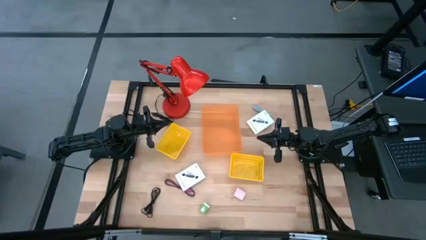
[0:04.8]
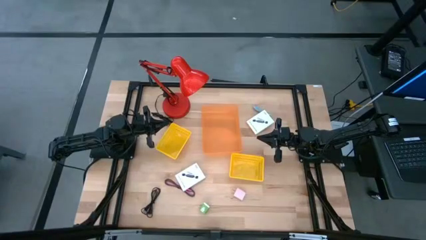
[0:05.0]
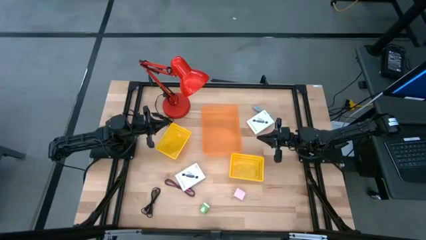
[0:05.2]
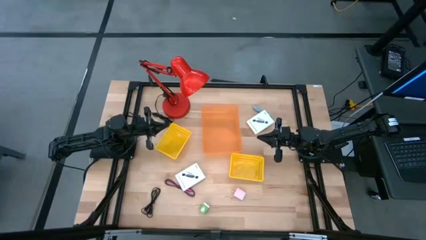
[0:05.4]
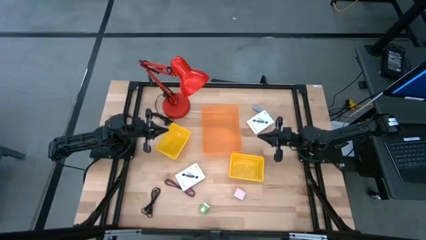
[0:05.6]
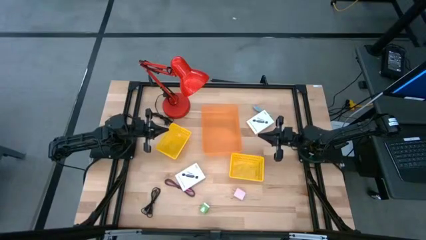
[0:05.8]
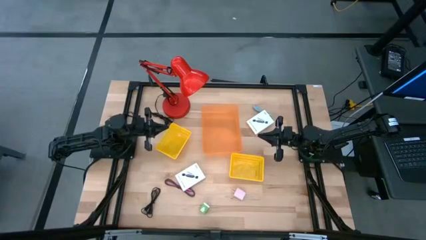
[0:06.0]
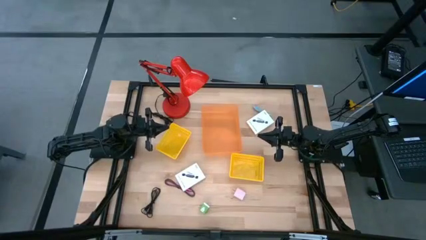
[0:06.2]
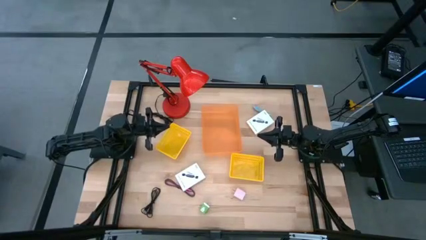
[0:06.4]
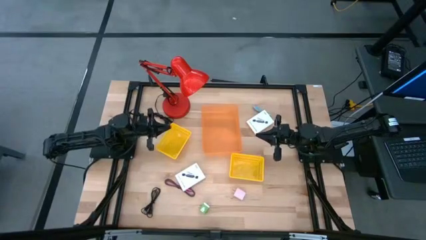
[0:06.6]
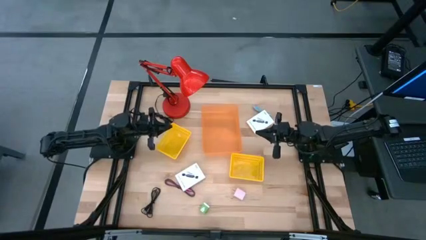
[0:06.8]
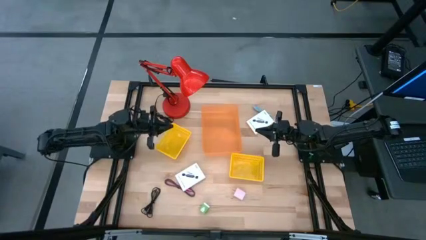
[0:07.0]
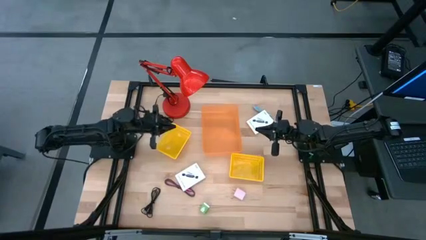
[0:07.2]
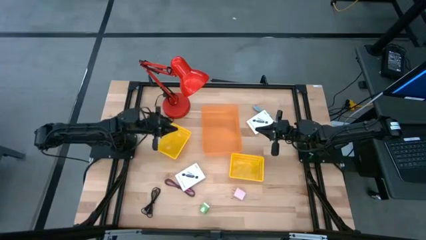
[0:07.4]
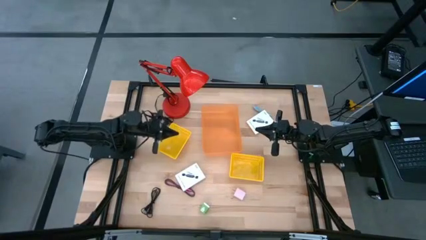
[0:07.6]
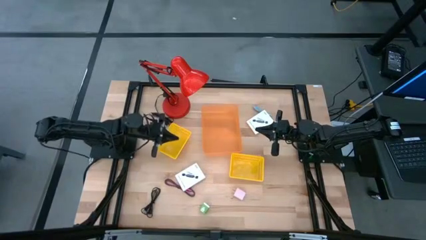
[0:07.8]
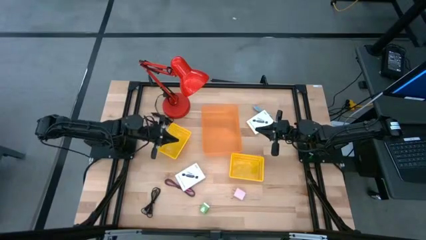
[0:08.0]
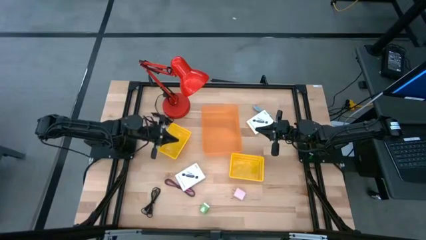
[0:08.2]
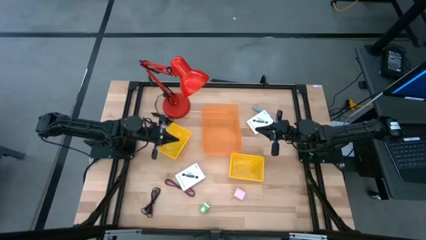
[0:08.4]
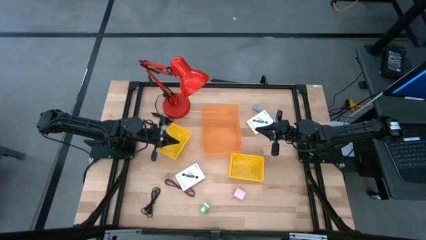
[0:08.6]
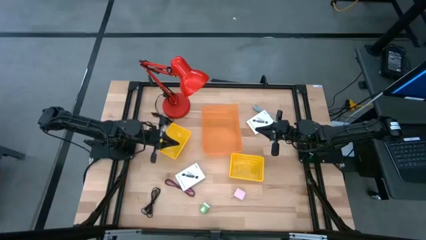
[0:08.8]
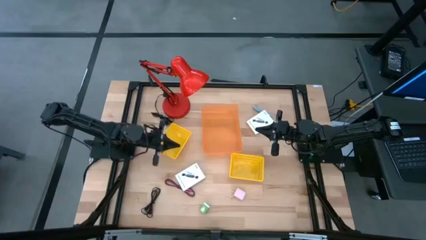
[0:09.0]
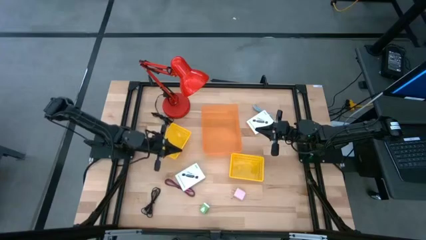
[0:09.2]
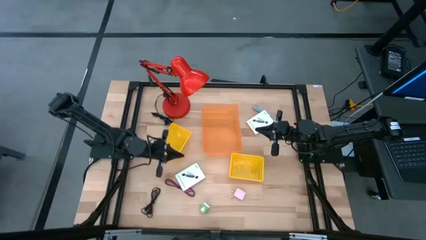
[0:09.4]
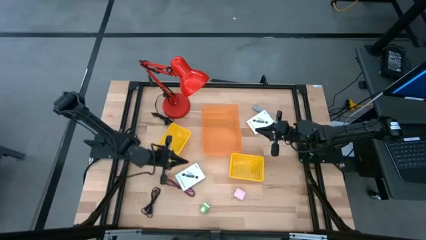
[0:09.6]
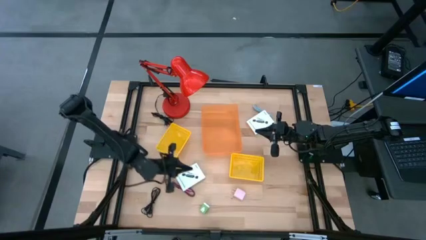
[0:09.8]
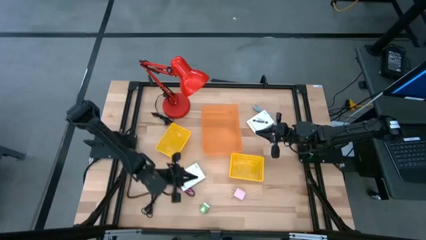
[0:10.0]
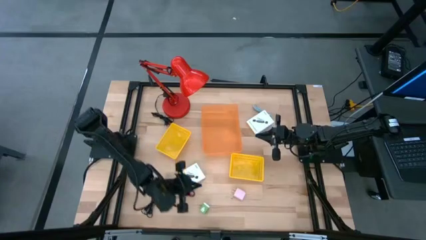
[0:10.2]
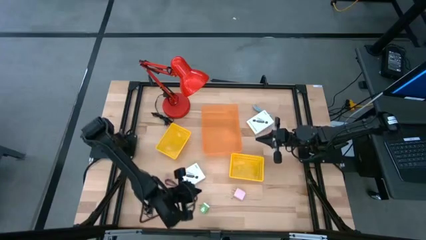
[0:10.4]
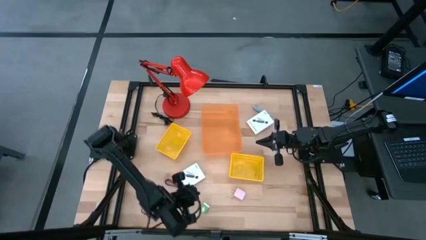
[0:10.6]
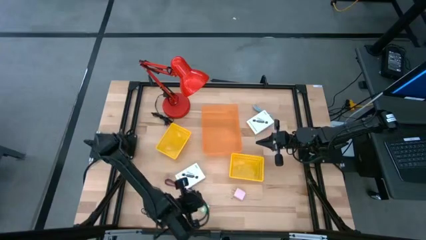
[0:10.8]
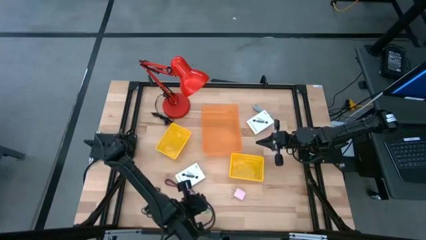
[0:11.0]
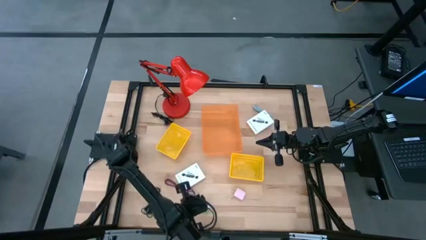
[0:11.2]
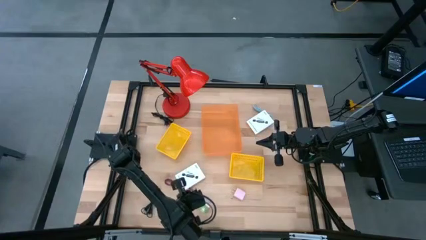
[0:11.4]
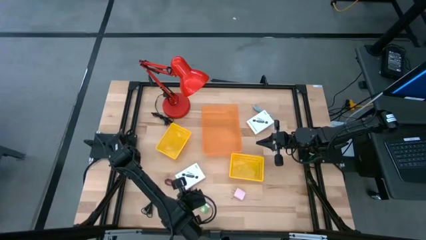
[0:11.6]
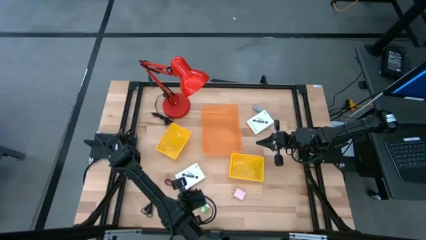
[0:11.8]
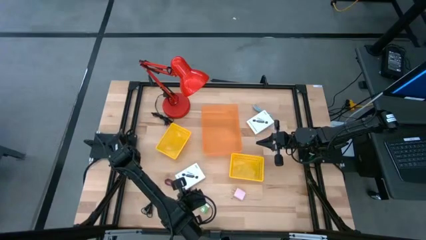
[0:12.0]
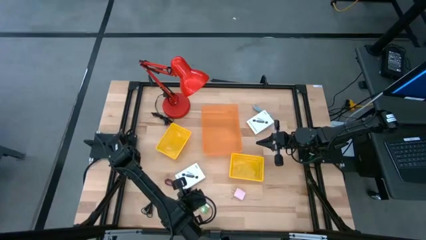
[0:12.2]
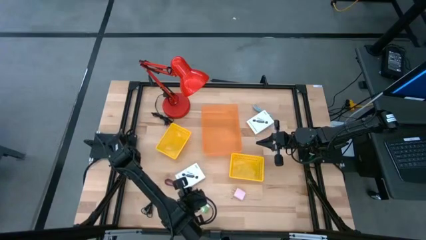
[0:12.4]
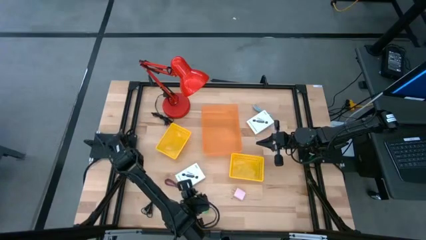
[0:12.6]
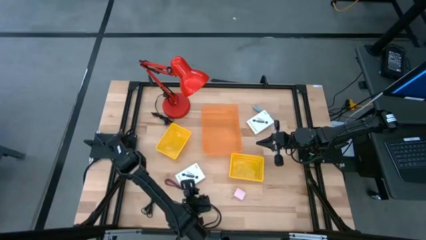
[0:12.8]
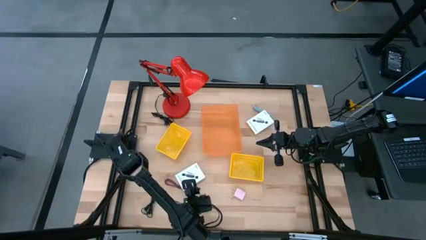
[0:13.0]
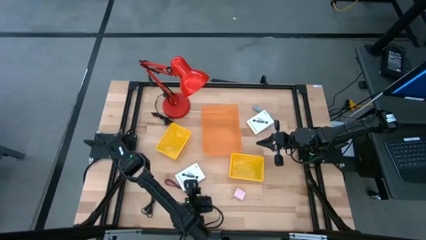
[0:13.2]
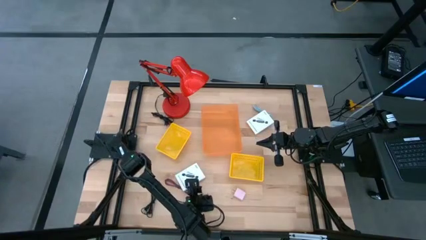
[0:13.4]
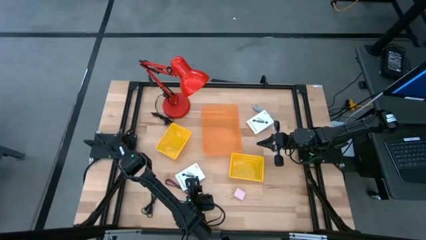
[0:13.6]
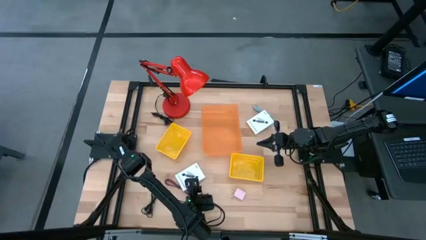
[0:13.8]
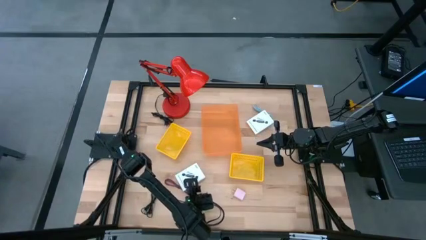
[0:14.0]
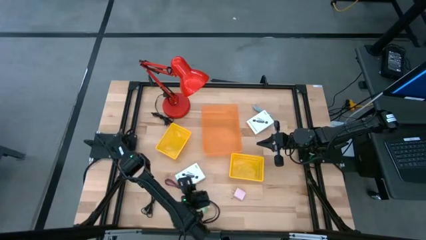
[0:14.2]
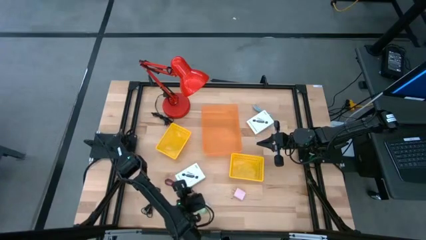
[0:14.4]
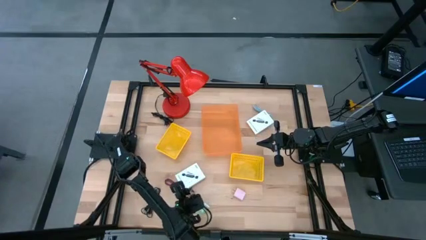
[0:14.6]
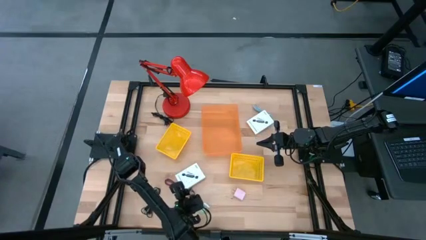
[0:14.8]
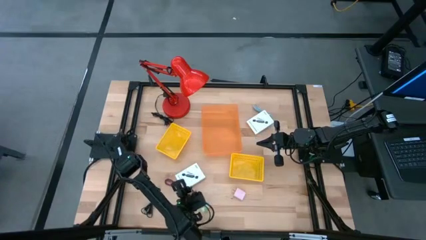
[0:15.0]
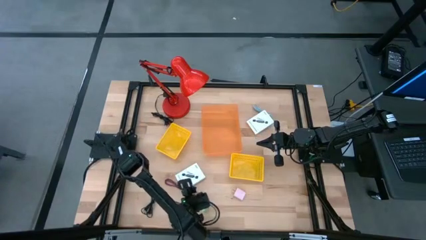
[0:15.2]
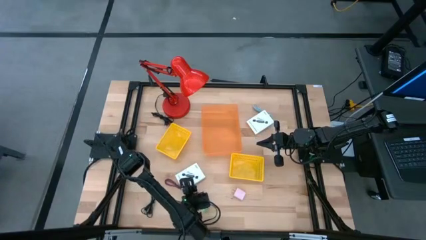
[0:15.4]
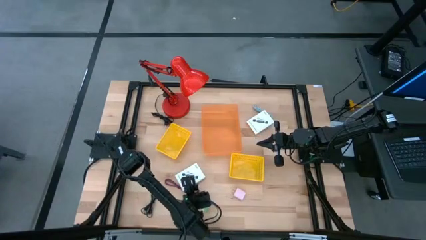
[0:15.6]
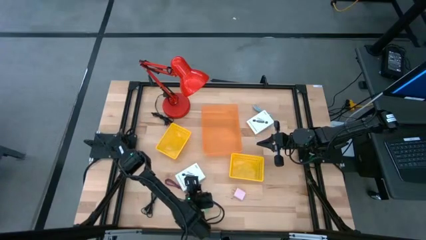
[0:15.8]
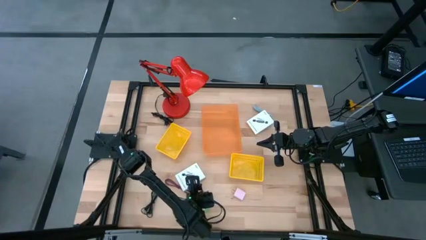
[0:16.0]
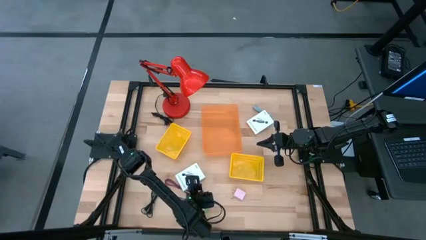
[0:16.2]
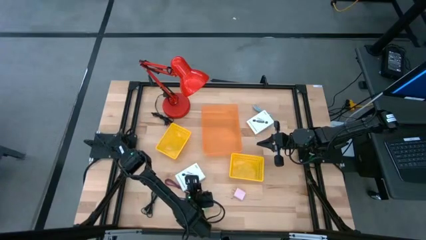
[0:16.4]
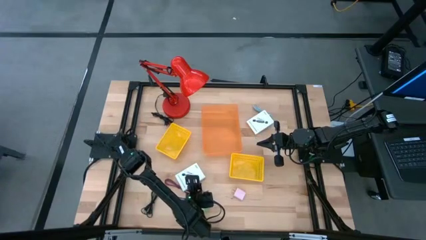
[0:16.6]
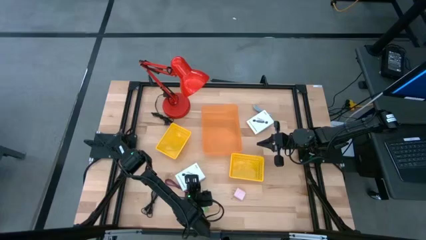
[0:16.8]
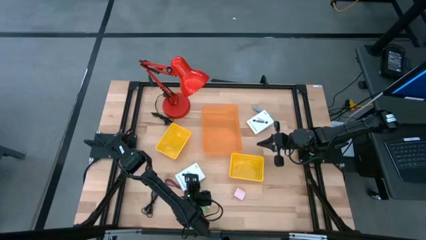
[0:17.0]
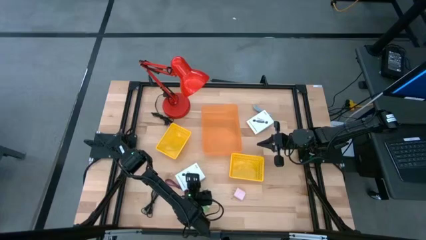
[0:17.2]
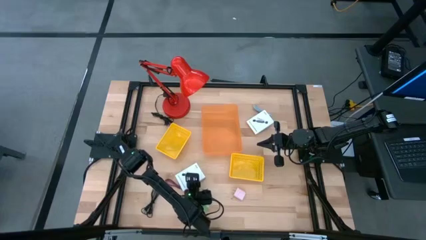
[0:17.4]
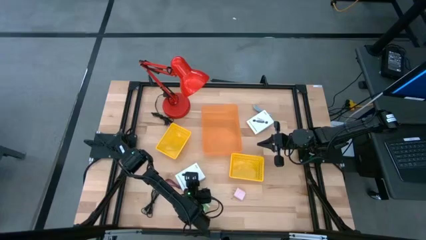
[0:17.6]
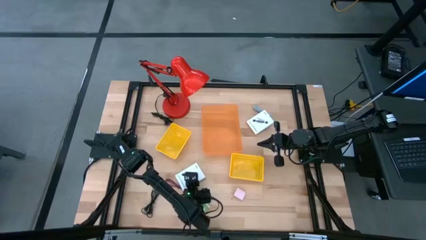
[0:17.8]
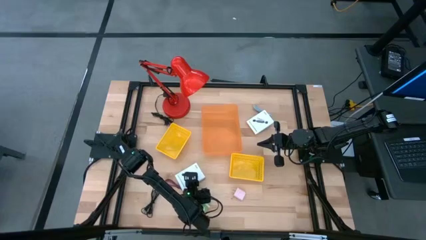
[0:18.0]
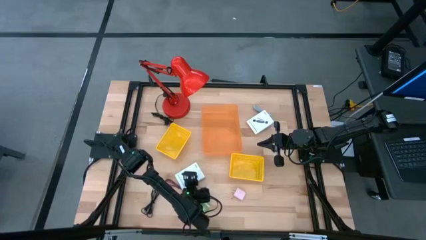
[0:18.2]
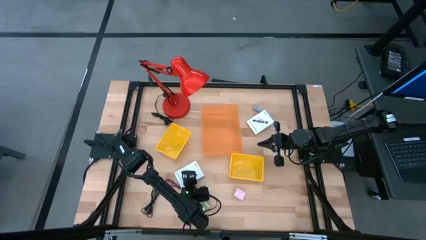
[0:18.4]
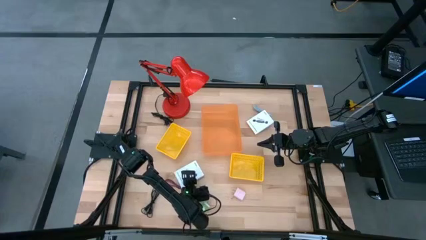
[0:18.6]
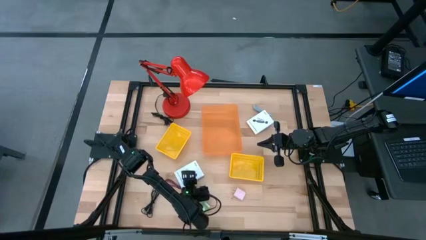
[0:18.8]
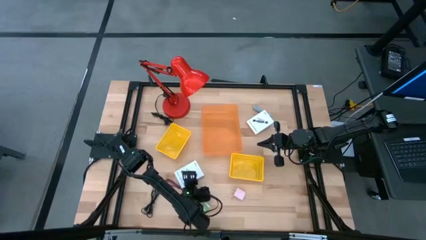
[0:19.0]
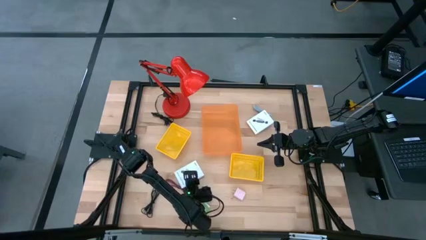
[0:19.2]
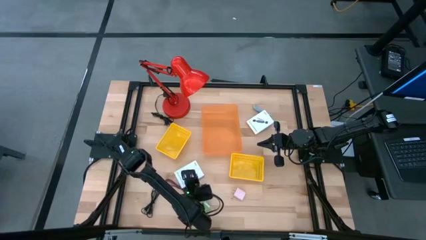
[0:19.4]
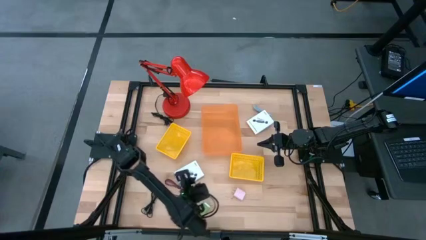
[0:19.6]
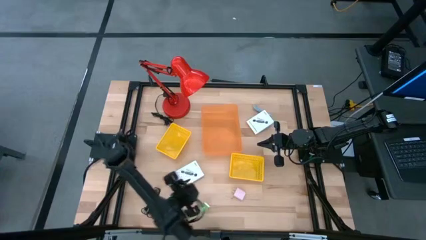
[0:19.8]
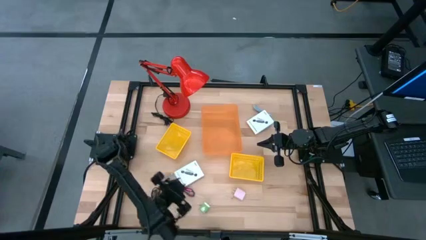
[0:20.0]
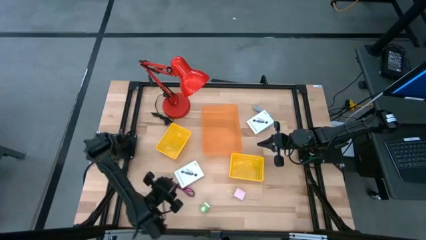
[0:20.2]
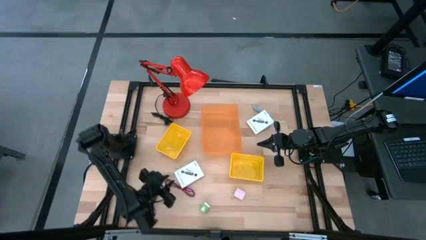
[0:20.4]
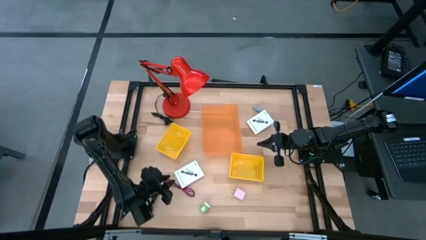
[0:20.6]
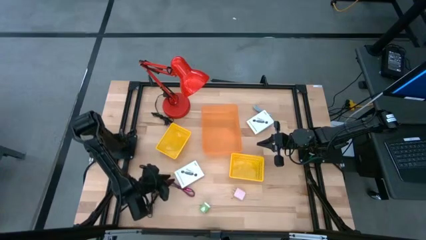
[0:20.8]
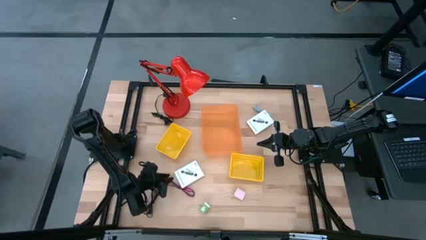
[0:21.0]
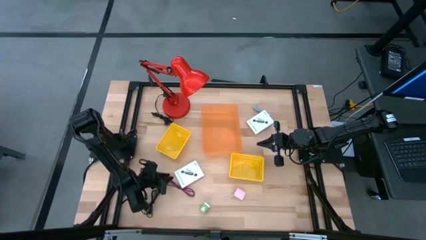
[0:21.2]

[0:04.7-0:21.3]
Task: Pick and place items into bin
Put the bottom card reader box into the orange bin
